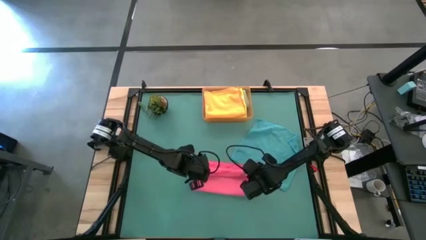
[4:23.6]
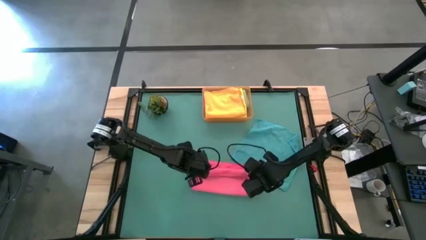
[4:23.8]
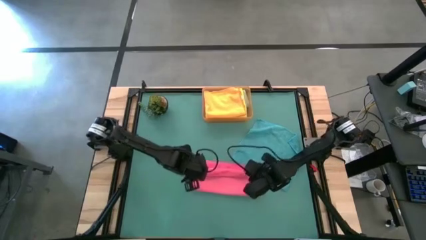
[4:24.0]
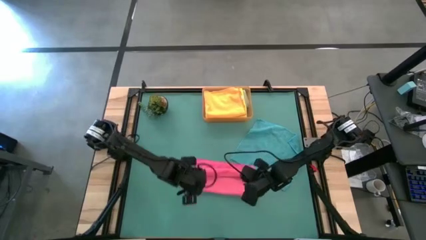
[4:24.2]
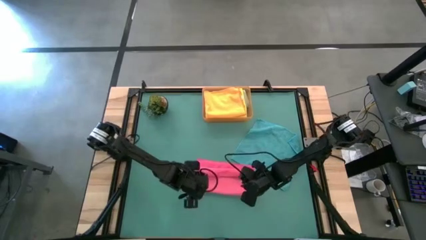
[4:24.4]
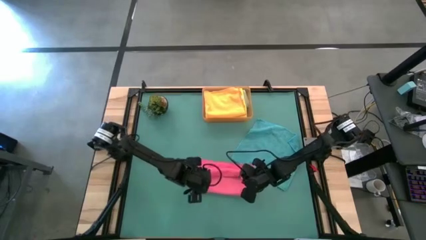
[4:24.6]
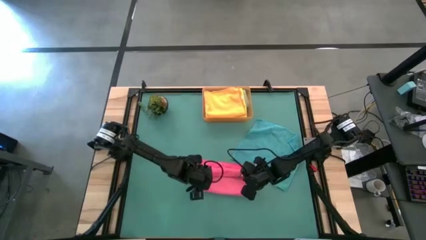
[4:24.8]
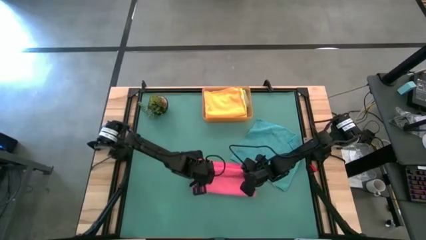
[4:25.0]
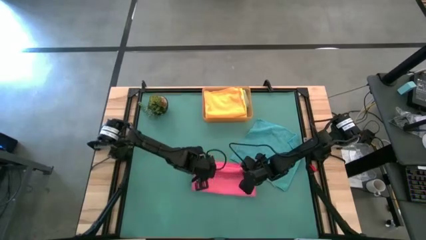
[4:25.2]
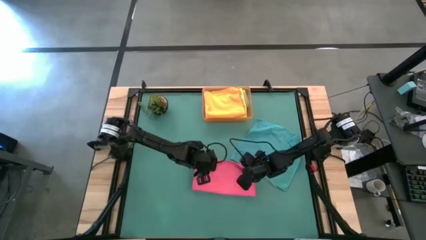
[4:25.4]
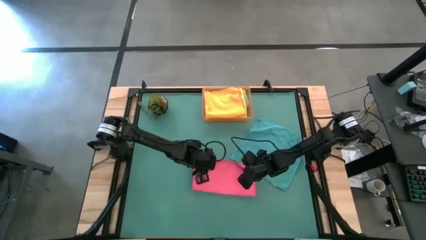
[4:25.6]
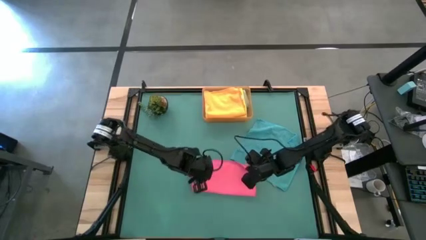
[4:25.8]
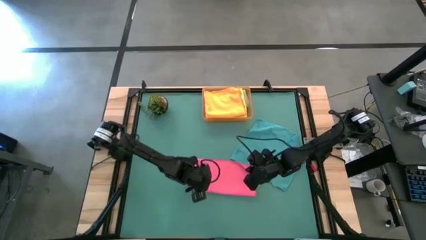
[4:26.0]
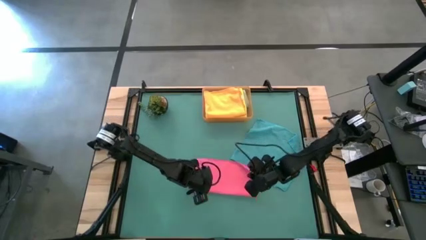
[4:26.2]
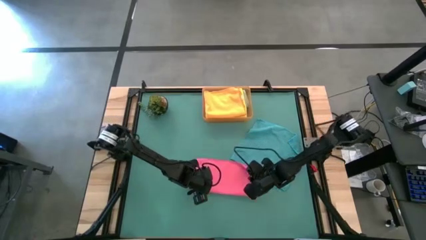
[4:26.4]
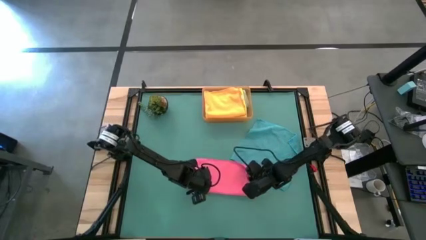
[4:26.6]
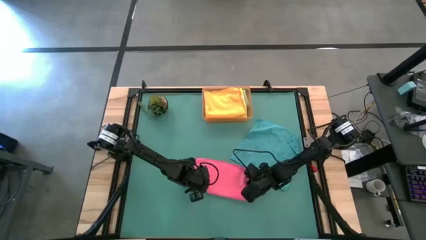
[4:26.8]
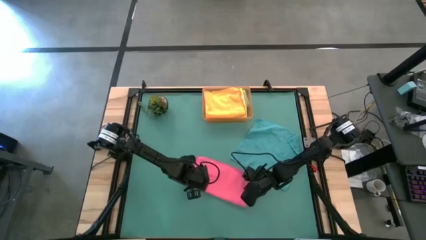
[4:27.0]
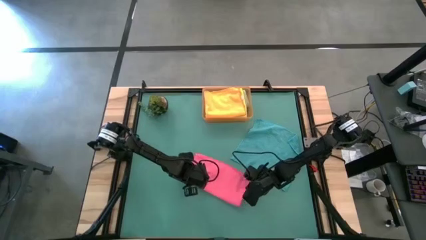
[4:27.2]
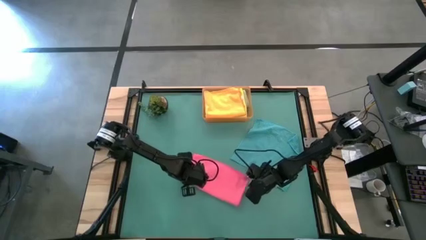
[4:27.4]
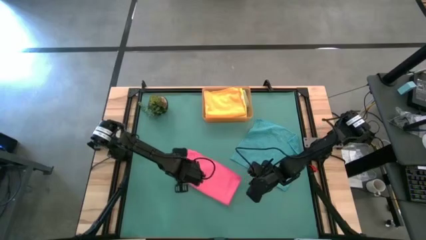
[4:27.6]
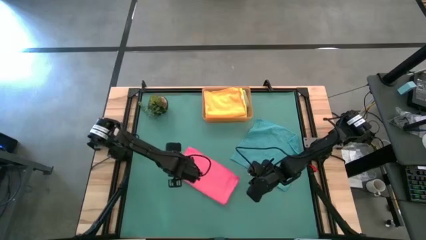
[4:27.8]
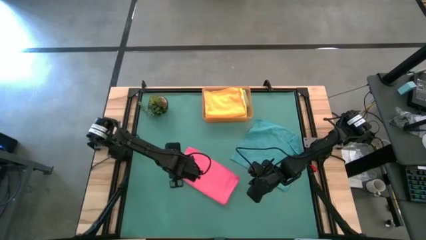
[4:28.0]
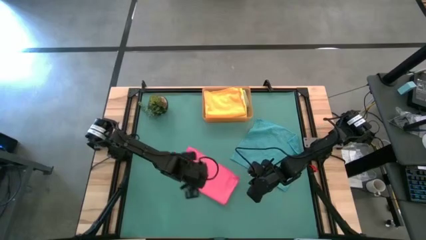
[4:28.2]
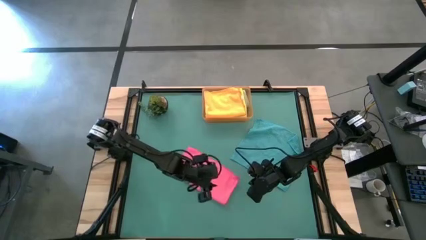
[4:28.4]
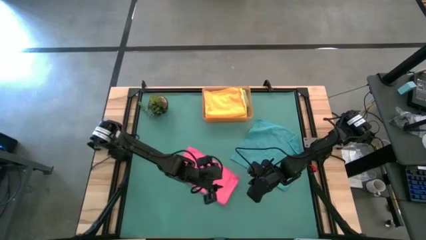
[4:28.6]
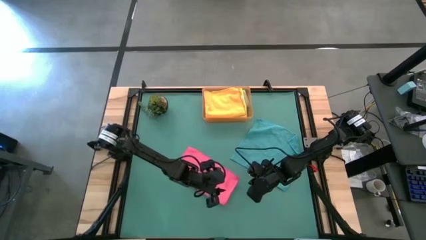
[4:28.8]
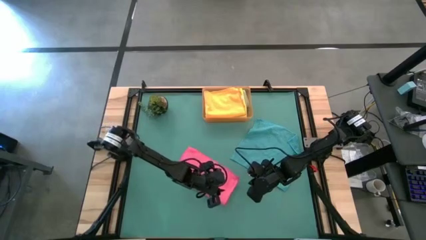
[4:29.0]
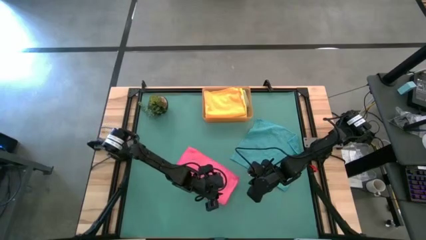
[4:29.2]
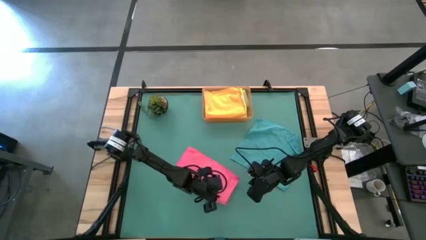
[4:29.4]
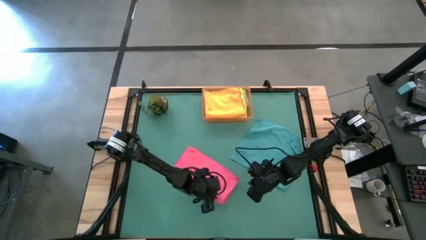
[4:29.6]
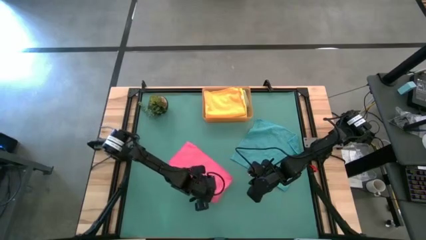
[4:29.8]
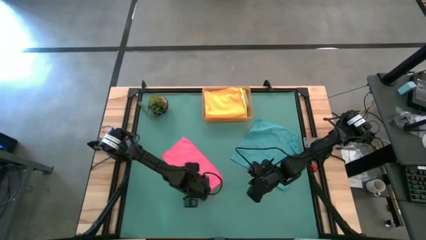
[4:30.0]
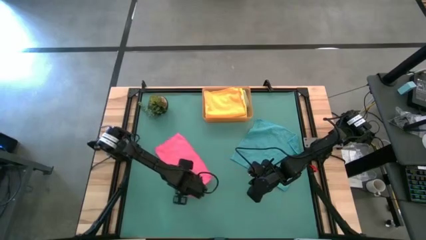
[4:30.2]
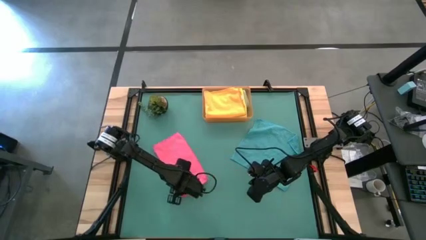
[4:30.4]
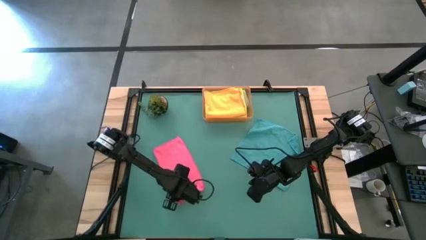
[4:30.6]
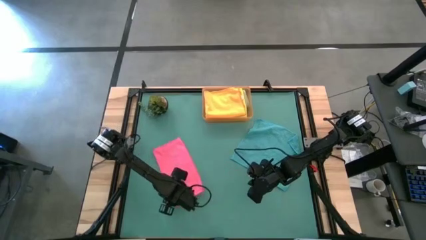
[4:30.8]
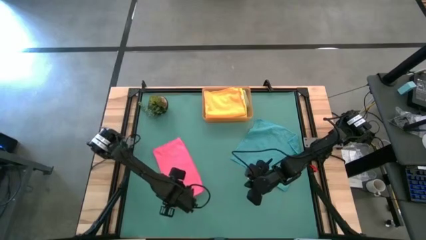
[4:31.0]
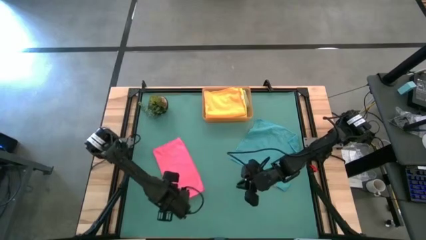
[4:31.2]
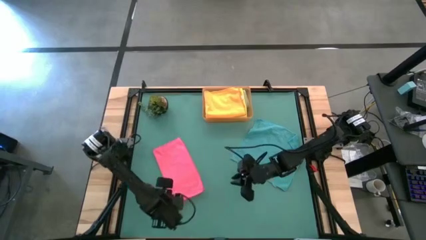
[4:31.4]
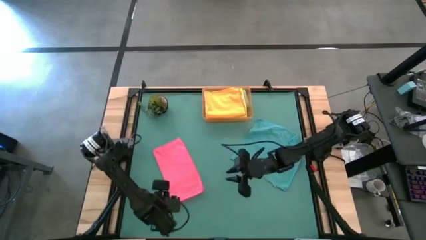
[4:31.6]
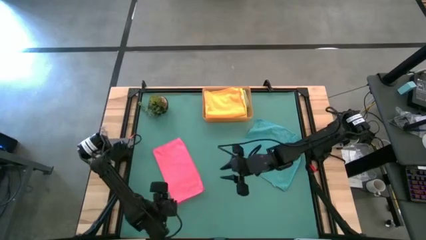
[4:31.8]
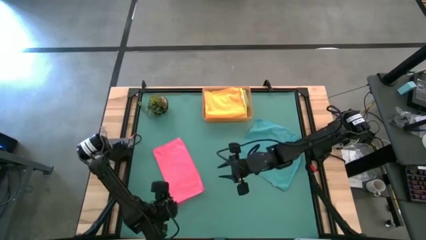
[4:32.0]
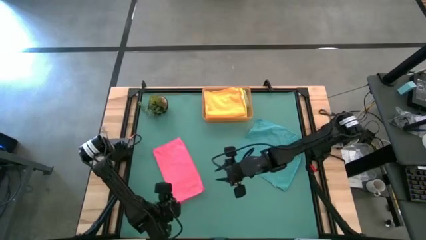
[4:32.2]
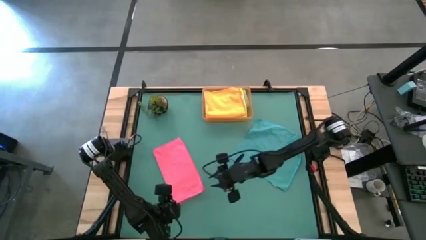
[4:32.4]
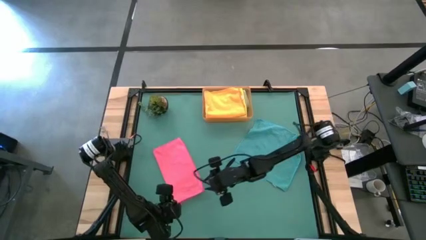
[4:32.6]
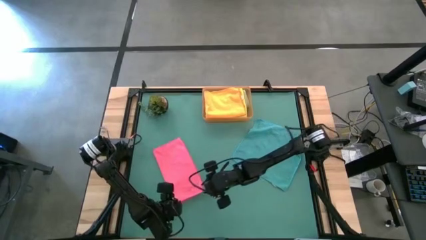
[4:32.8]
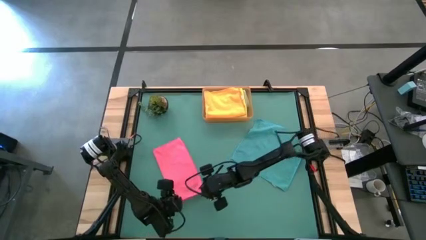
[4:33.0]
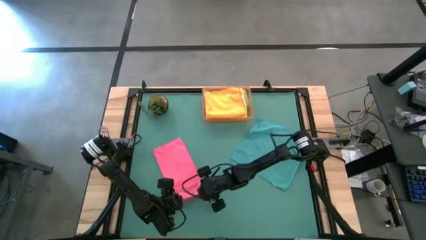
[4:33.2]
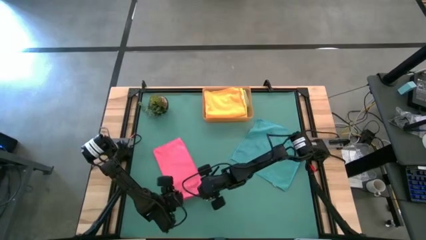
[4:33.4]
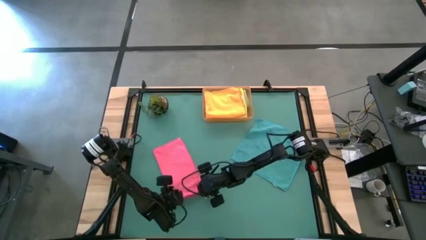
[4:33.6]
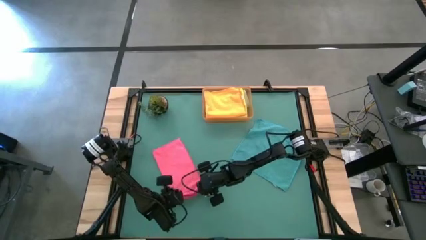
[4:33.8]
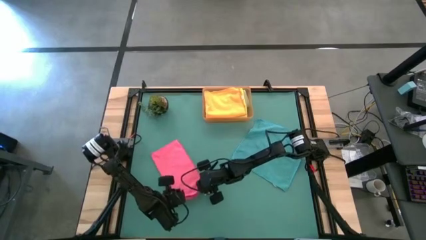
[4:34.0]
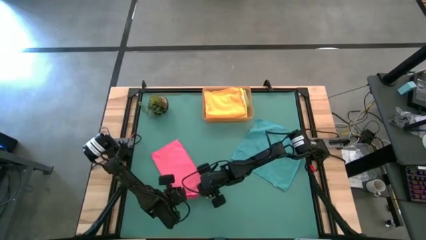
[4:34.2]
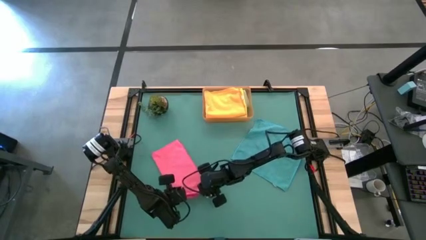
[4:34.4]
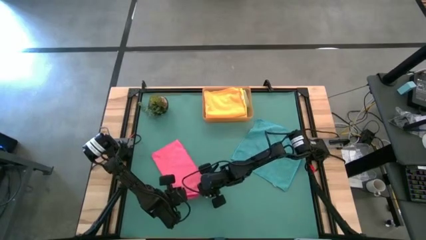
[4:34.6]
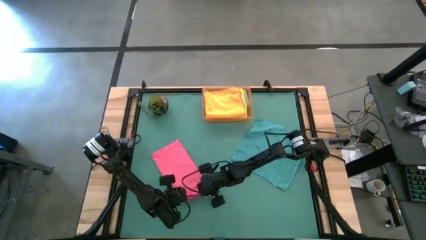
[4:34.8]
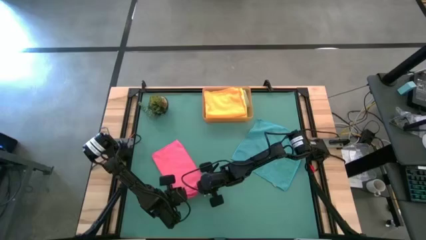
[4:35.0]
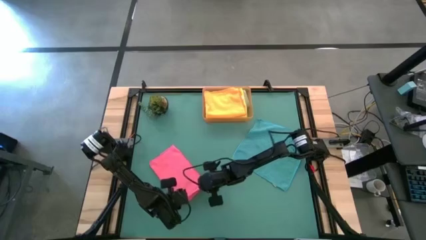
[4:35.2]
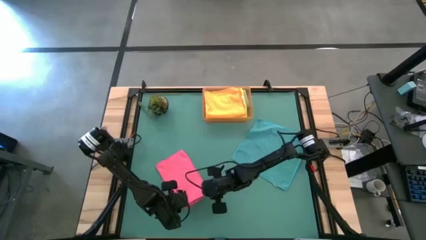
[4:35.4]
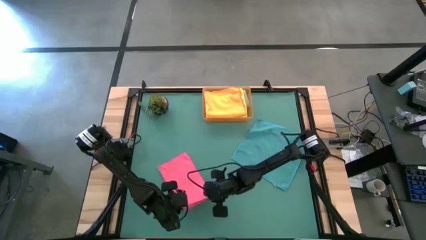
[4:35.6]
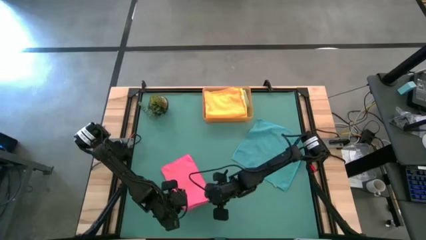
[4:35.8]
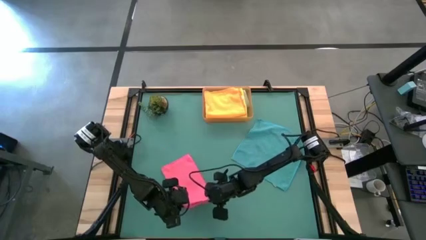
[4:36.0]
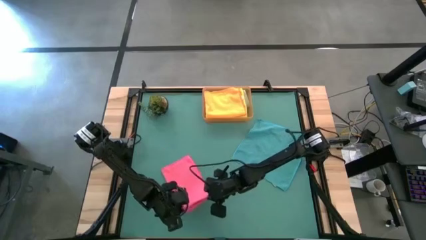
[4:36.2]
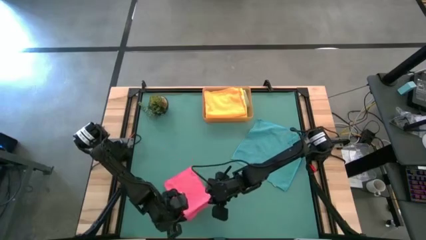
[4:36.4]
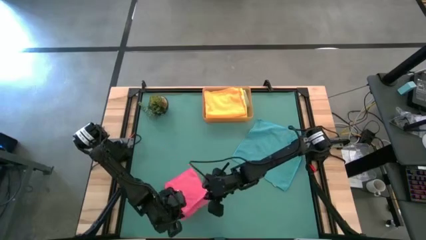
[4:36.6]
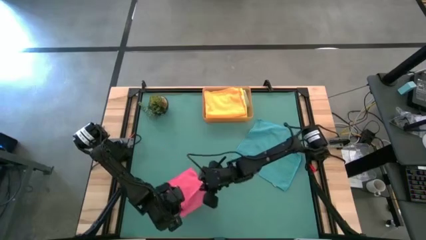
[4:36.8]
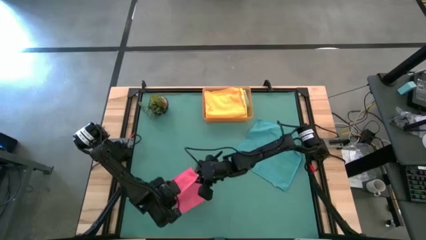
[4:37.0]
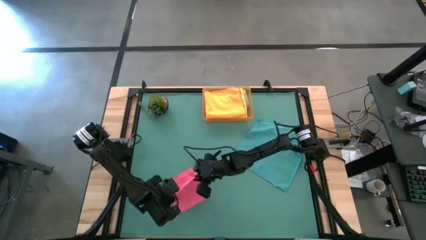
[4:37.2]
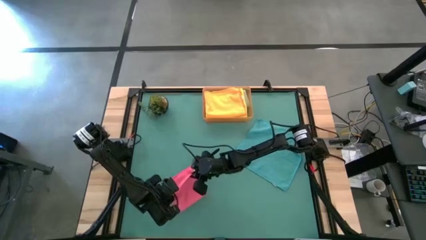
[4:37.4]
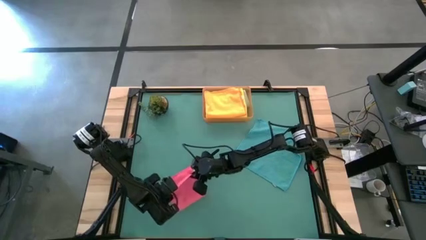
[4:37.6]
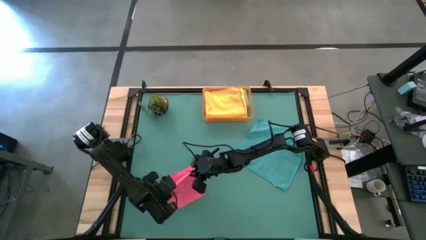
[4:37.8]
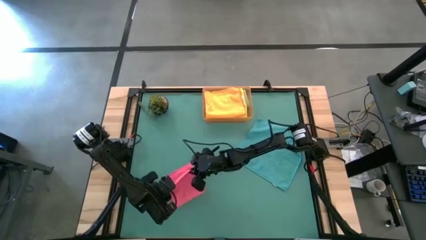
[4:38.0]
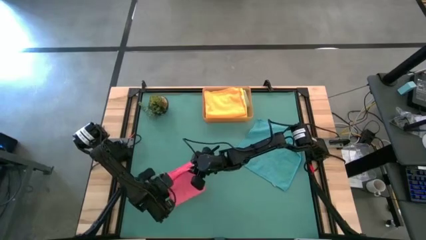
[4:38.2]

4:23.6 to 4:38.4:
Task: Fold microfiber towels
Fold the pink towel
